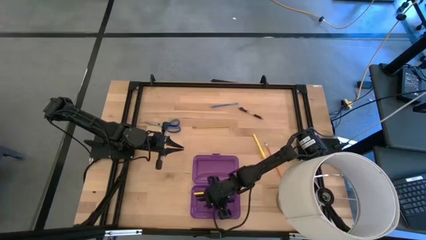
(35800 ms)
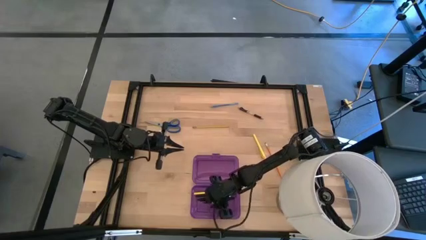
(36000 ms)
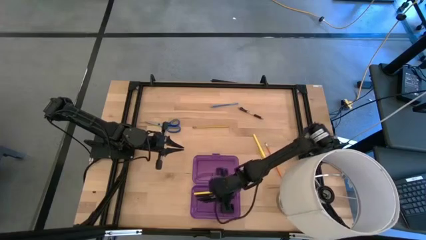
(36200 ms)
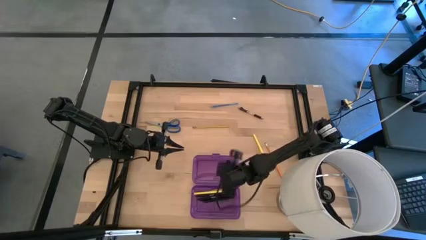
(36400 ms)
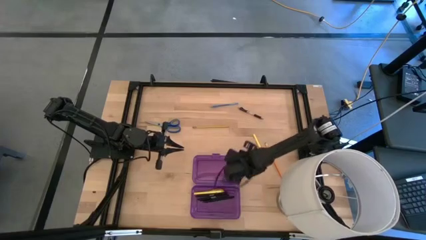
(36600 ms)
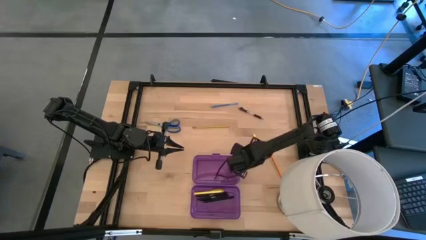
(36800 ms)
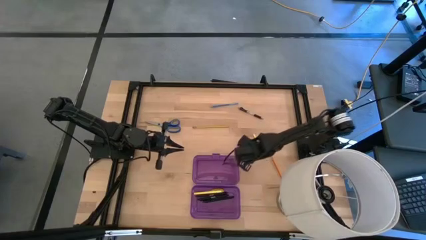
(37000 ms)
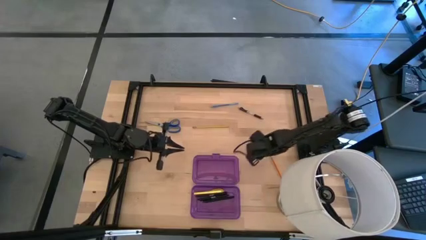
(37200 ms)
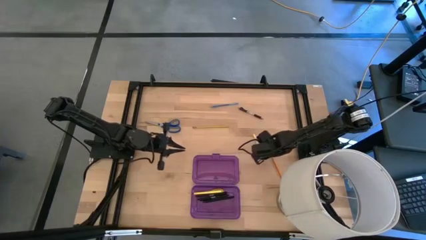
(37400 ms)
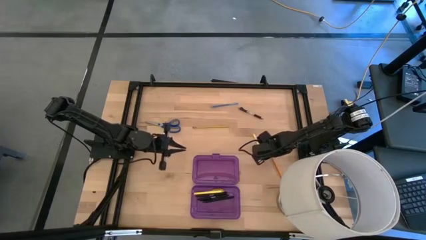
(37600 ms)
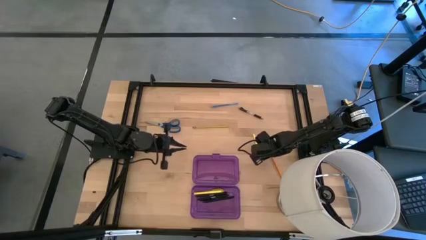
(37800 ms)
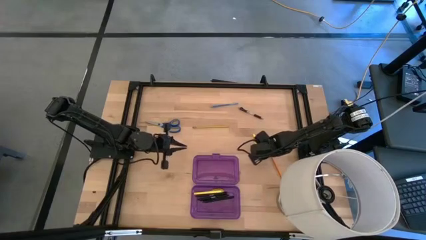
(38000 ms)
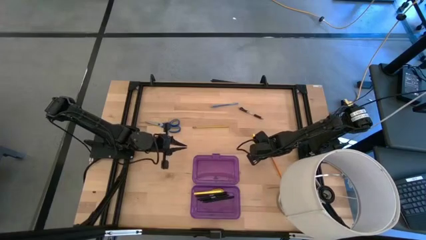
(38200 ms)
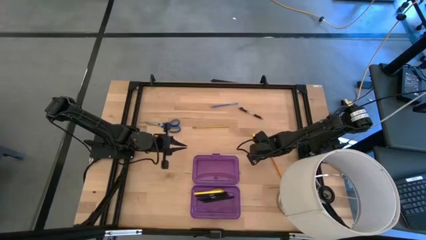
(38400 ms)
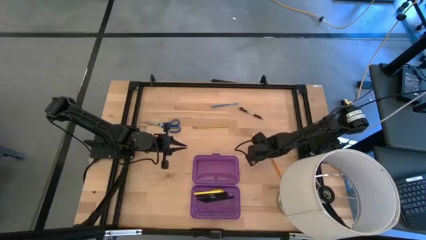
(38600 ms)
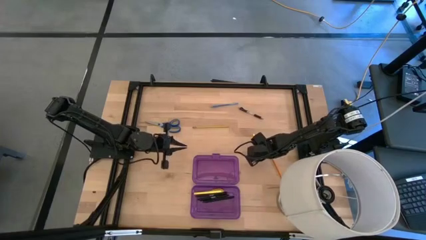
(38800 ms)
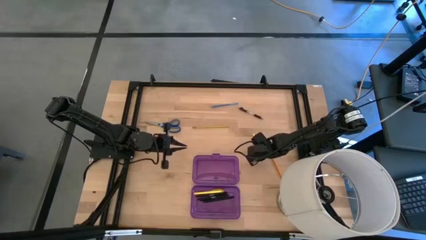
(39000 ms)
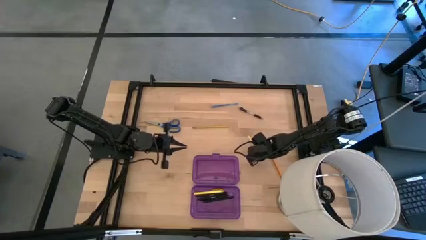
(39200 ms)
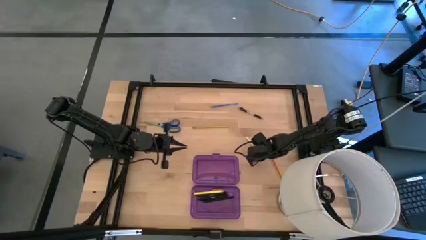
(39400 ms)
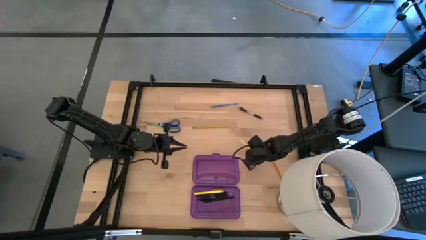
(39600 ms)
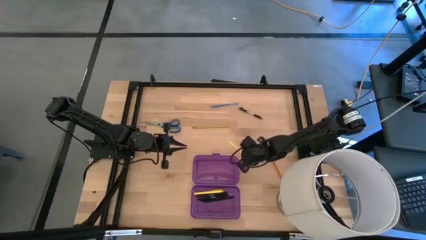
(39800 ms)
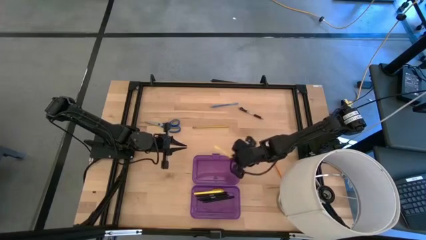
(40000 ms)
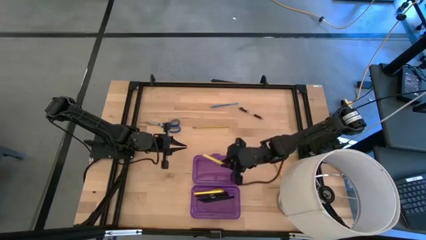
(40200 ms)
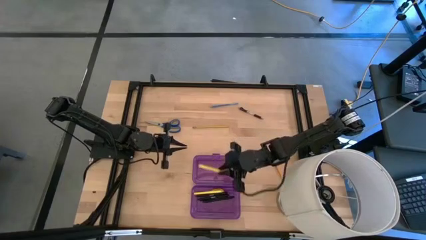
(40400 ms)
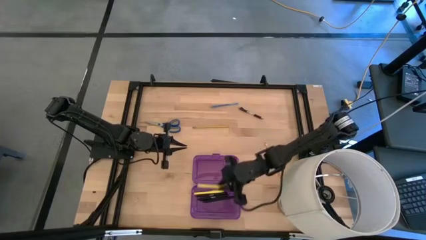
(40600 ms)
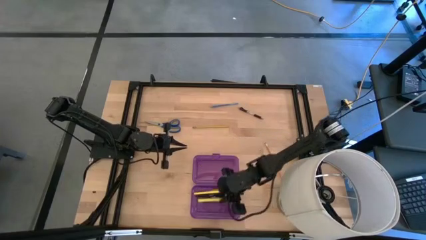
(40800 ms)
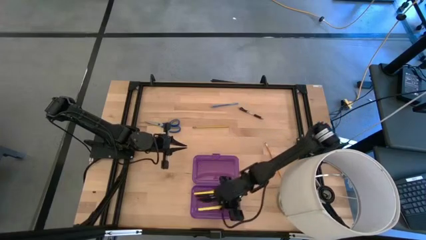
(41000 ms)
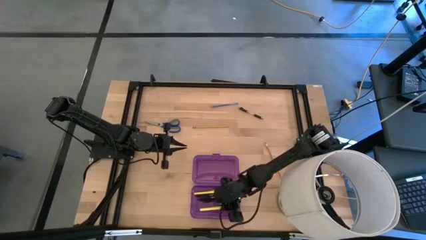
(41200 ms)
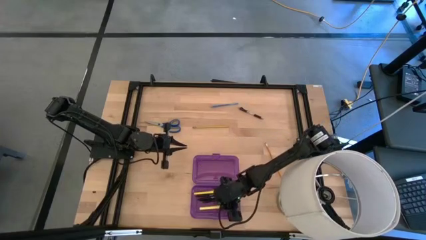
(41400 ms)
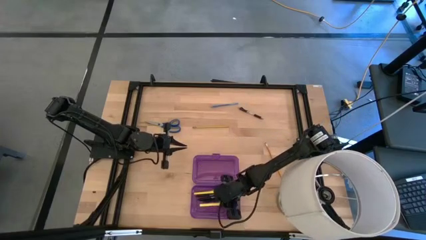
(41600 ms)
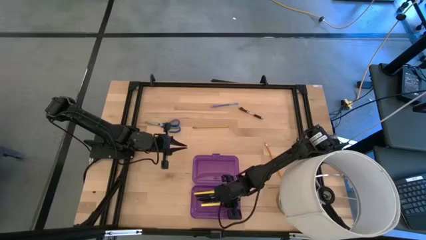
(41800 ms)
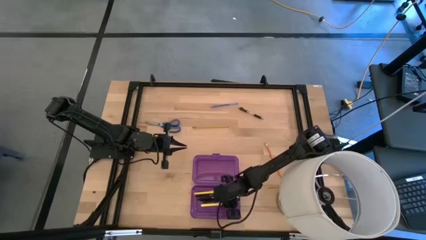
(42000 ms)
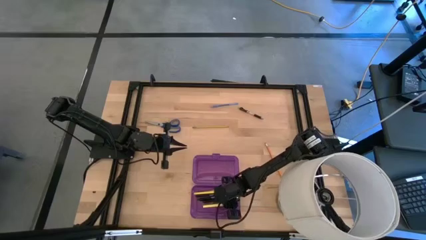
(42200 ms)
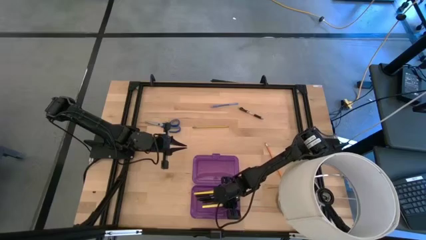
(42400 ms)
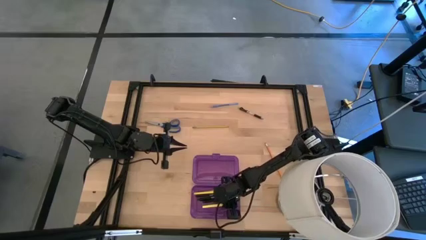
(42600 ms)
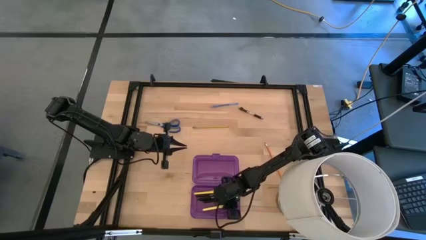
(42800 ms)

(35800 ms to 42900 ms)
Task: Pick & place school supplies into a supply box
Put the yellow pen into the violet supply box

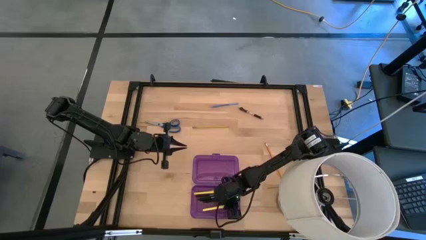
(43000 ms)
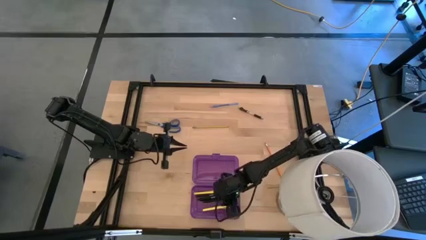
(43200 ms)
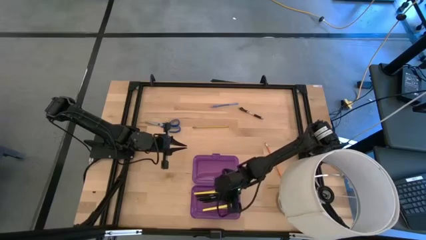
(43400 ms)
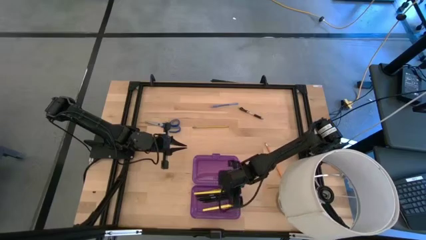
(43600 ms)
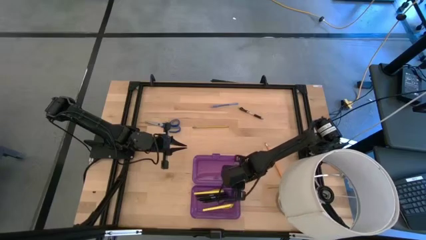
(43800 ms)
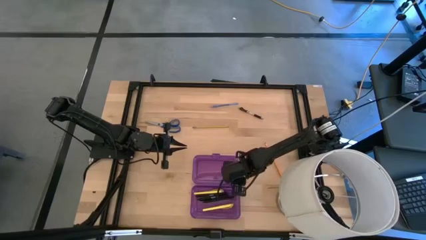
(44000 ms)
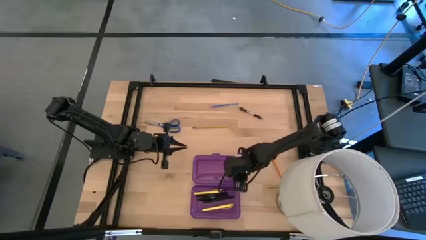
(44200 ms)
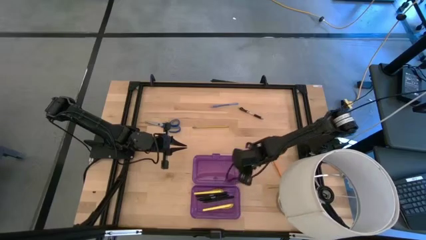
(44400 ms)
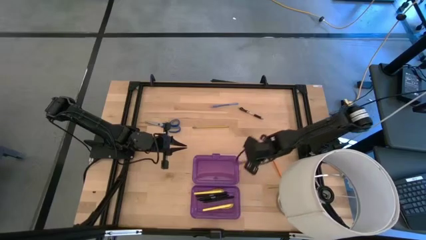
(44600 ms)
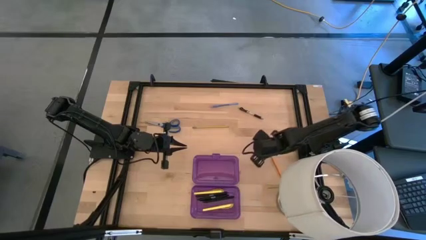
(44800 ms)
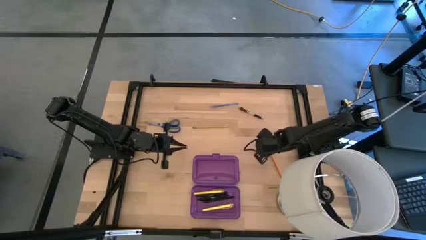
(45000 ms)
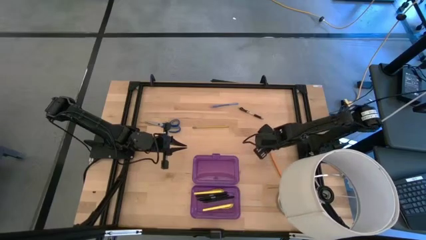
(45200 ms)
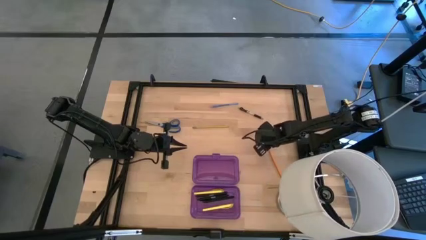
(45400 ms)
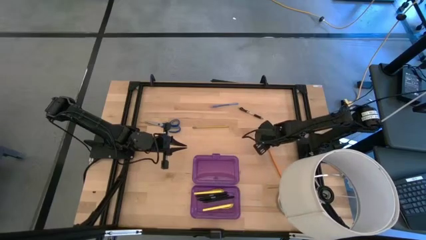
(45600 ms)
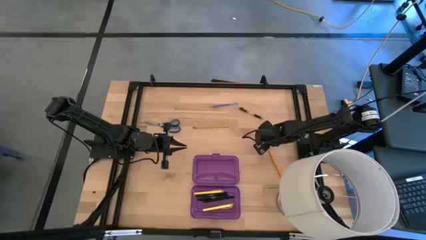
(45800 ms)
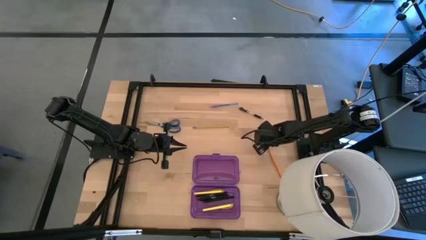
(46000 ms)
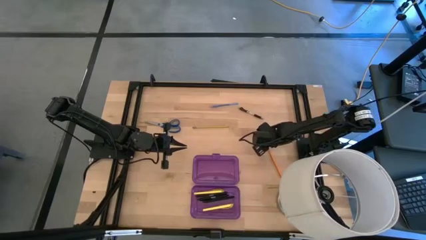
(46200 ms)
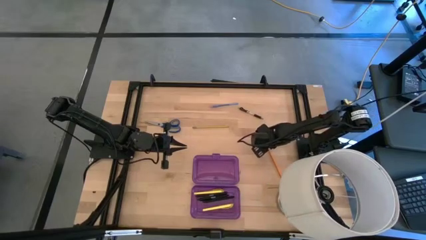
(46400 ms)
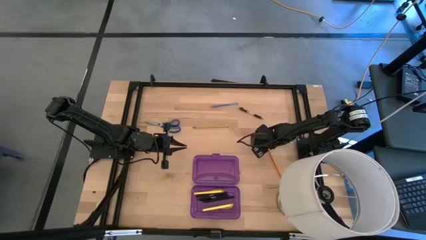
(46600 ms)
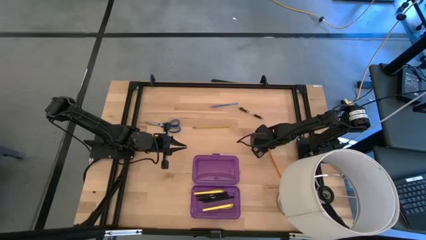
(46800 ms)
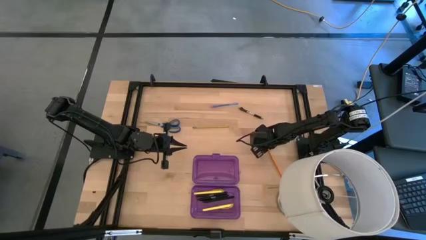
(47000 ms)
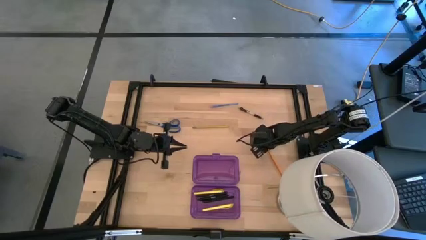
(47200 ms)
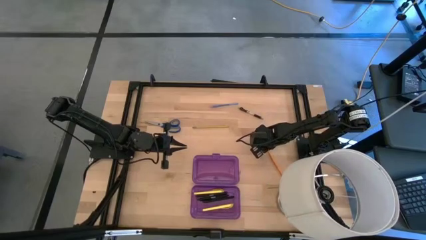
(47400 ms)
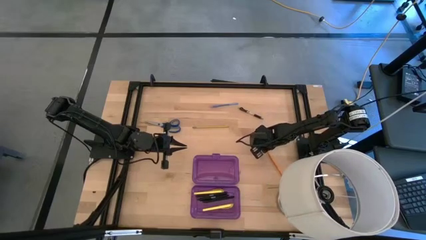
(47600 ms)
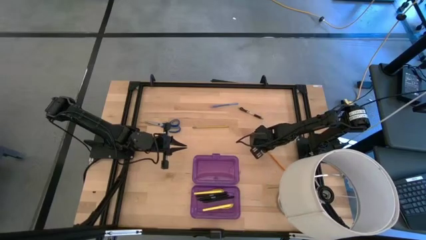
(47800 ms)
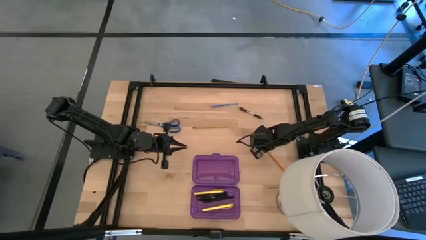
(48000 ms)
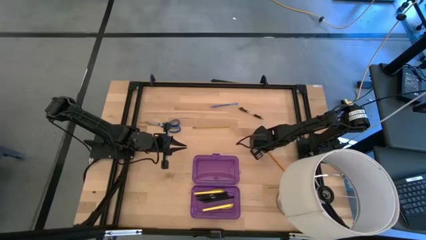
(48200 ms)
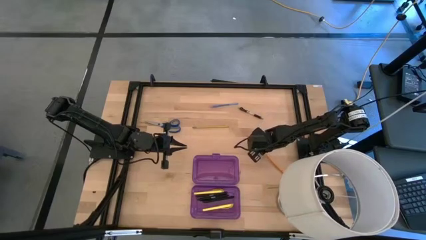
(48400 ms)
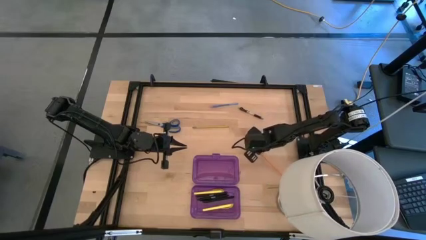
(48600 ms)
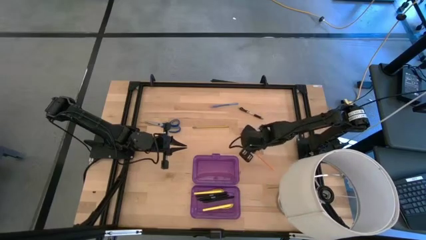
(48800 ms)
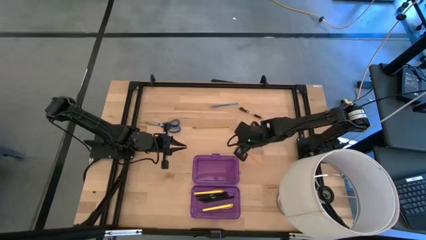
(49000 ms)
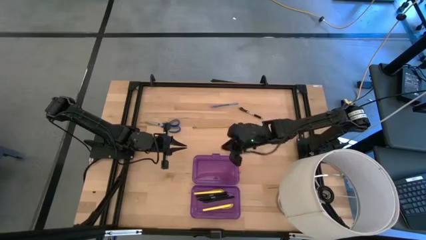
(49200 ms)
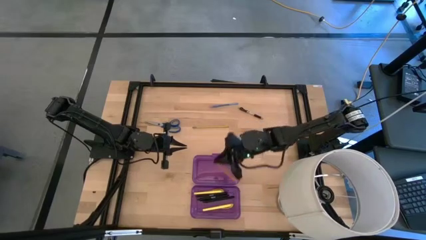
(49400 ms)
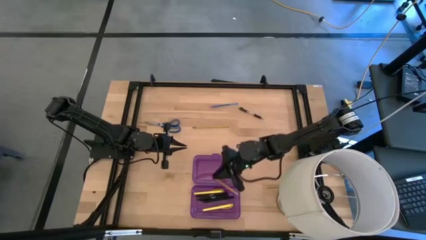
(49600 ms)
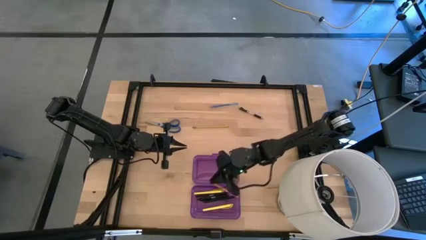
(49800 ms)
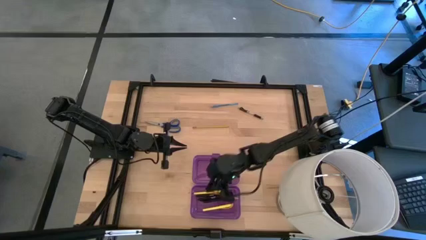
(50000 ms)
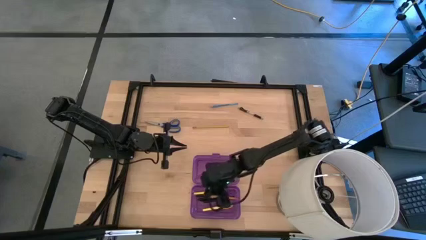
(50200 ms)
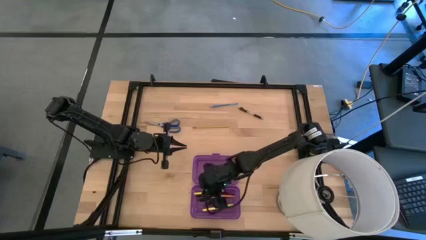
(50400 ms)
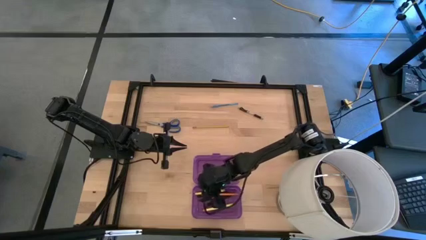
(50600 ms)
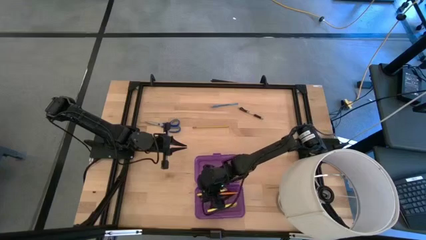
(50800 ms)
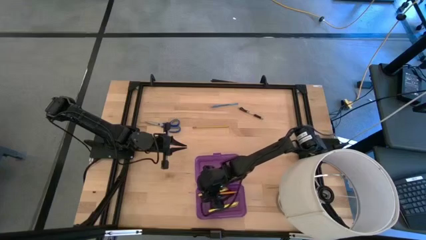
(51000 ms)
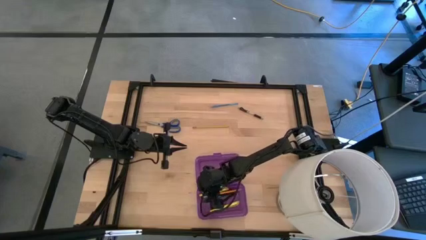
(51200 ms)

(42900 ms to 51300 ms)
Put the orange pencil into the violet supply box

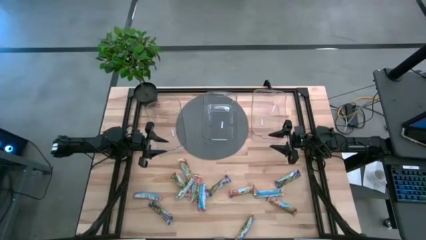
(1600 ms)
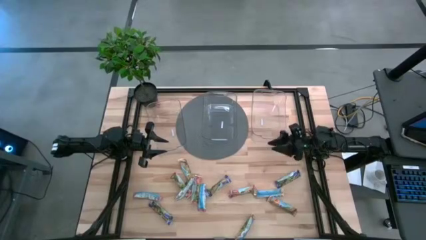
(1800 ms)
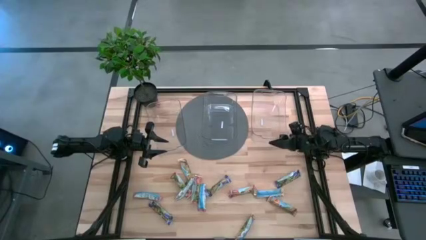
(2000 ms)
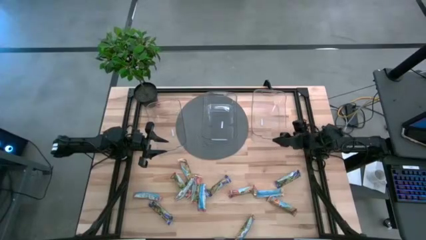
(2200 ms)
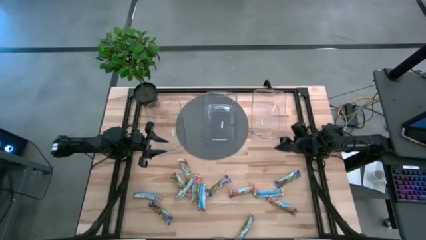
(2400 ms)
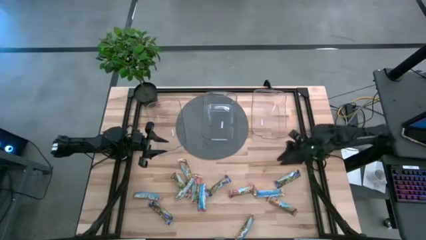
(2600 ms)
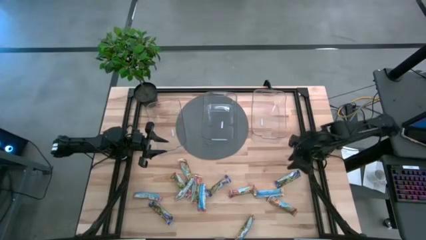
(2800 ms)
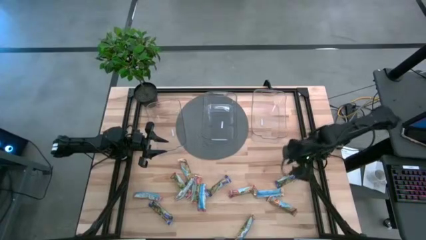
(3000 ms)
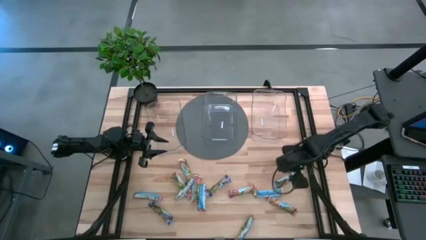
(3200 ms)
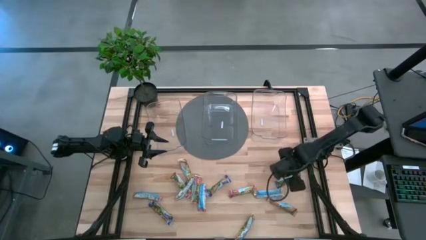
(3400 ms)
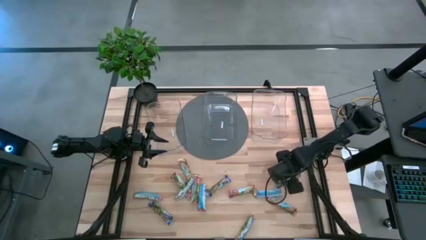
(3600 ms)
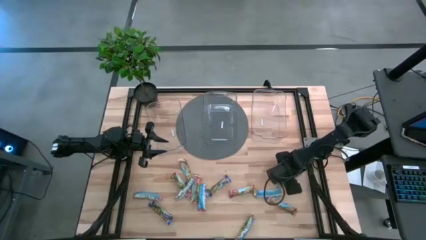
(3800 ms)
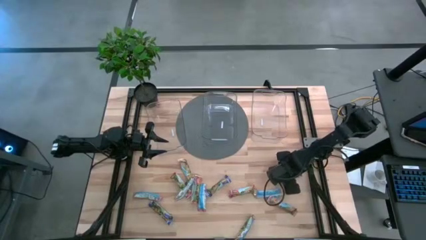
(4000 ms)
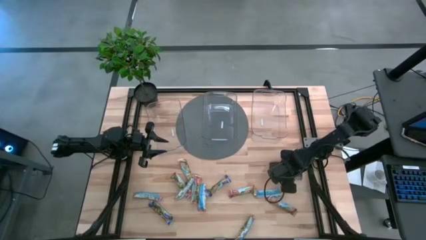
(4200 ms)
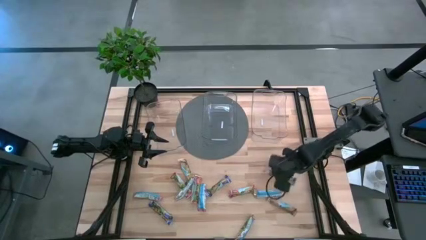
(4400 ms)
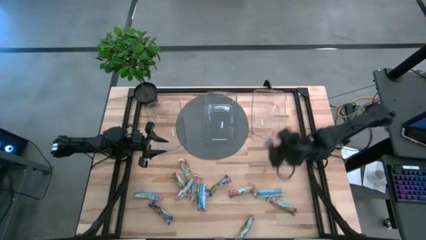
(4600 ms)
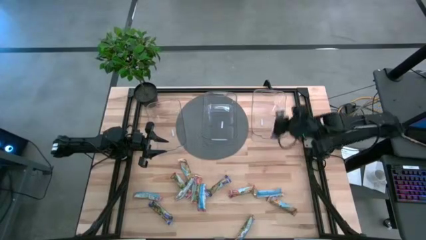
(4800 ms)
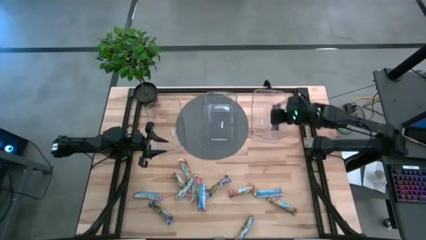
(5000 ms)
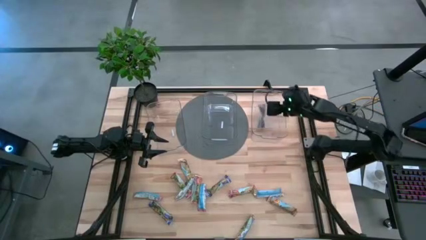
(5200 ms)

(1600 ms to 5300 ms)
Task: Pick and place Granola Bars by type
Put the blue granola bar into the right transparent bin
